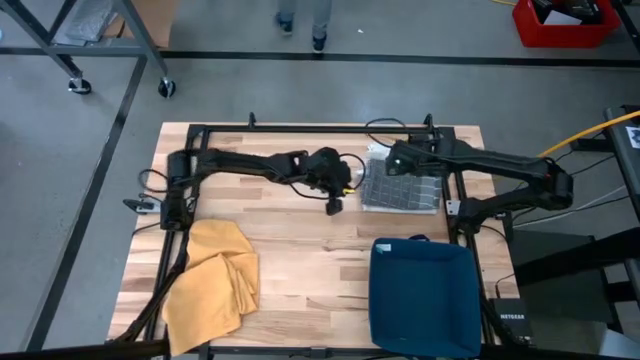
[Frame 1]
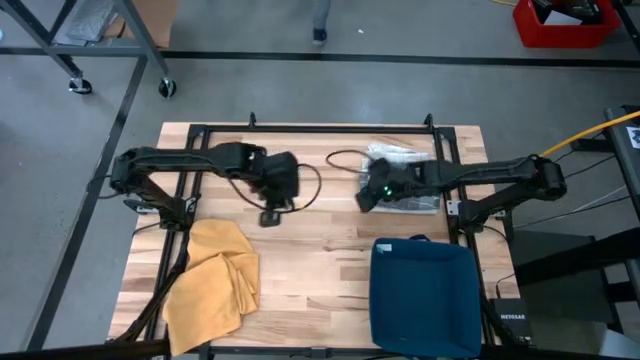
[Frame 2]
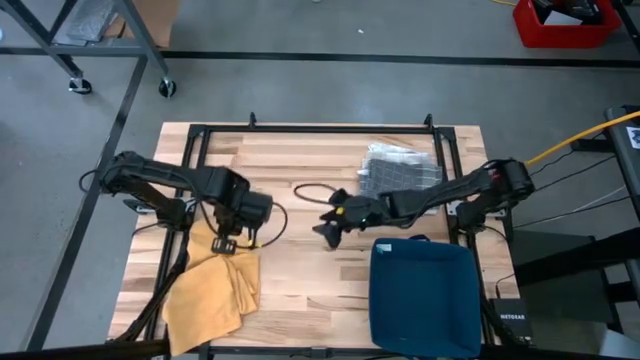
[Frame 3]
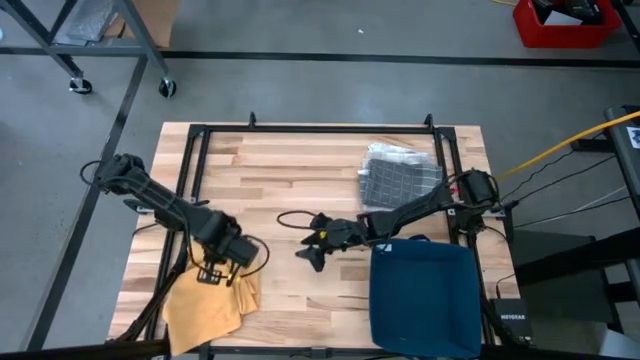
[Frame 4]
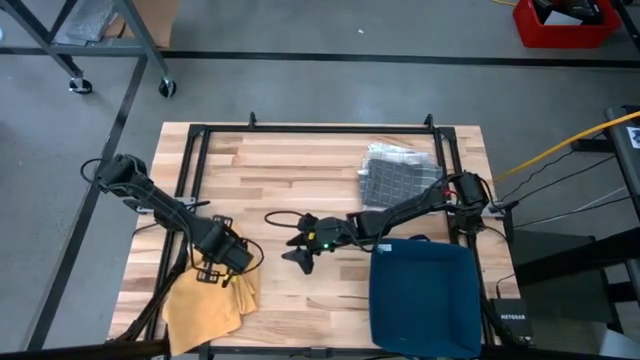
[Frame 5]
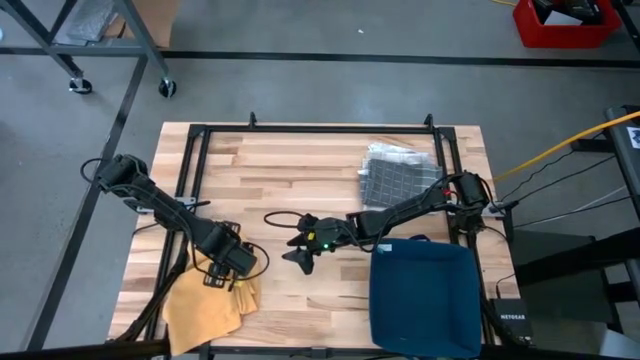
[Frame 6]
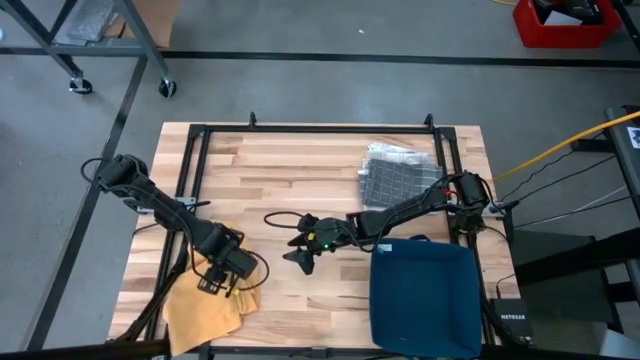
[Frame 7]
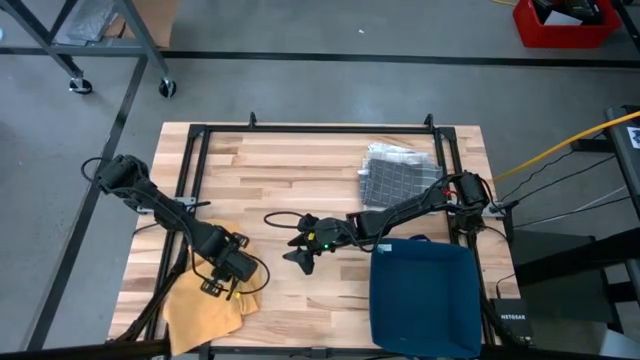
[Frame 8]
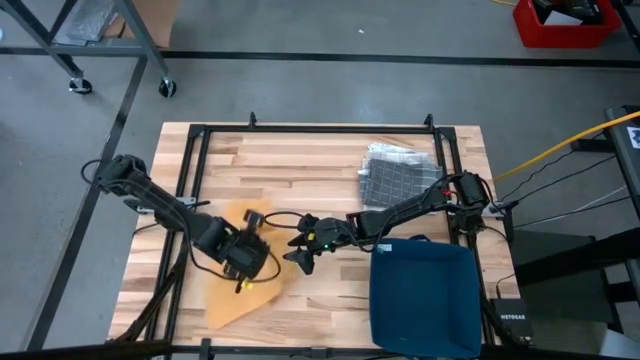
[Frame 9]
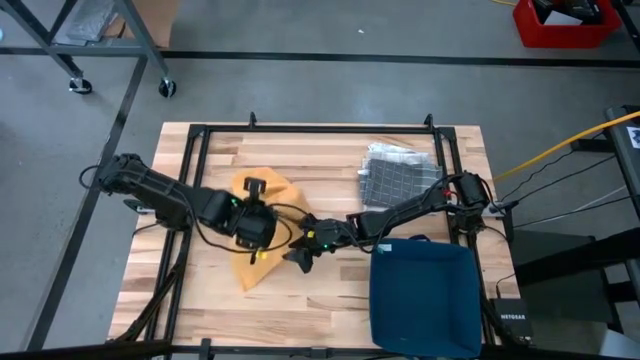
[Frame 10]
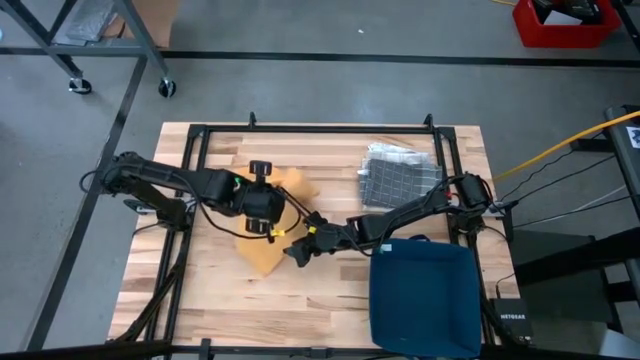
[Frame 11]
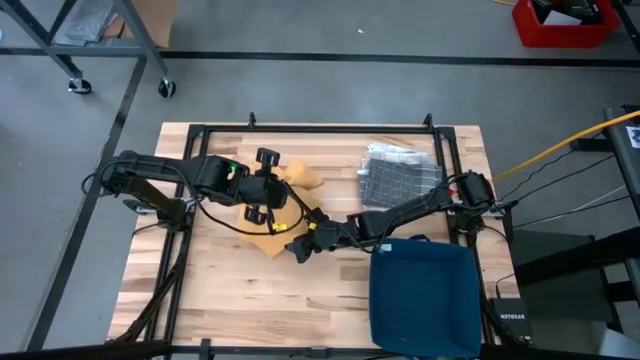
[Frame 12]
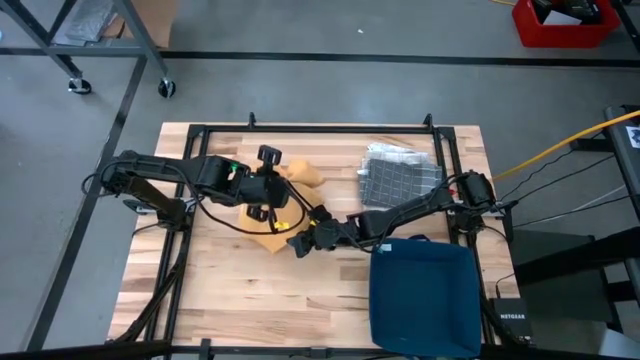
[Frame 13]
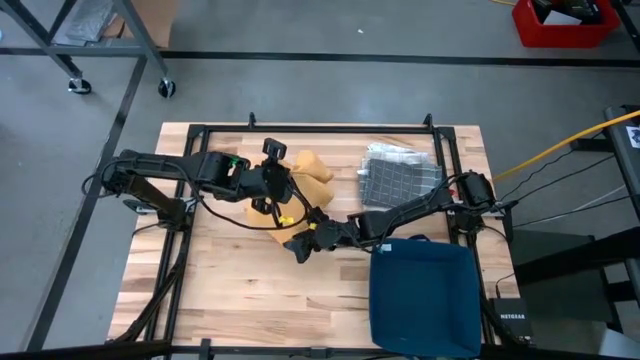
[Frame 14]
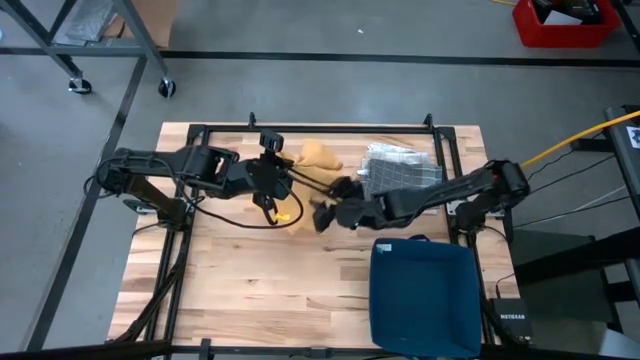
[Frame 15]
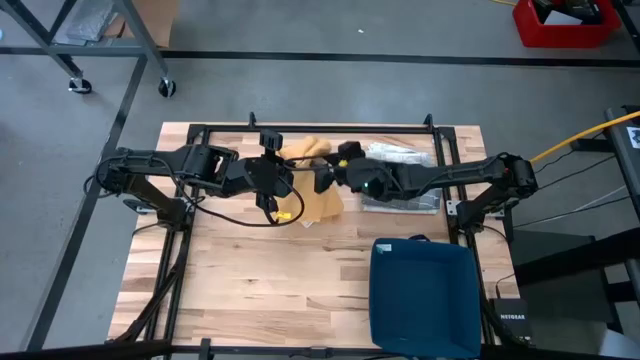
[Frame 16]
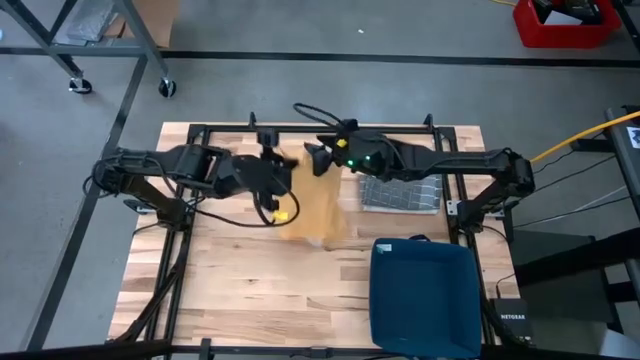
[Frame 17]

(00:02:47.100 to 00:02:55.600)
Task: Fold towel
Fold yellow towel

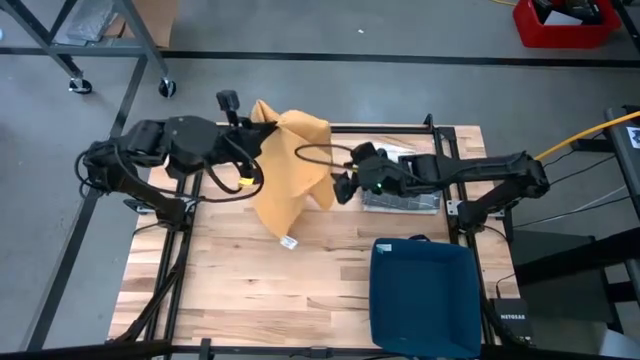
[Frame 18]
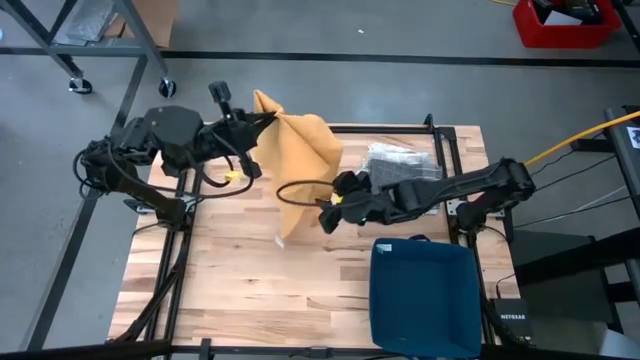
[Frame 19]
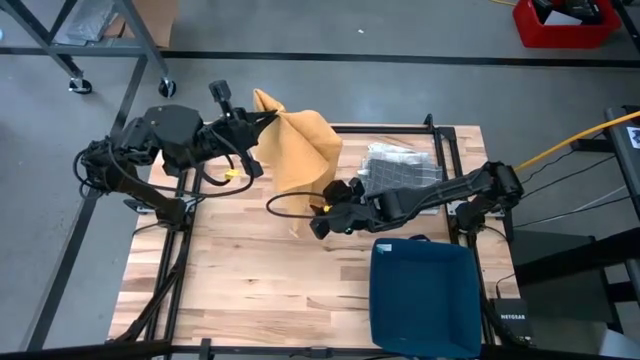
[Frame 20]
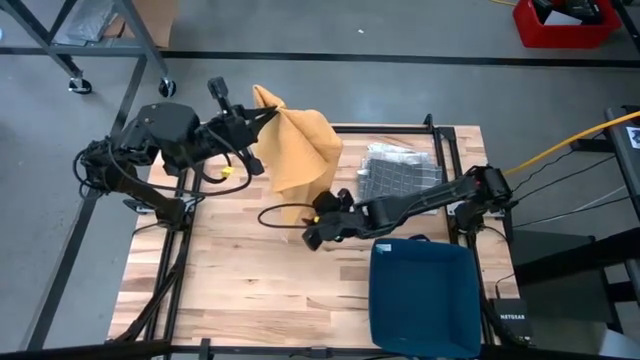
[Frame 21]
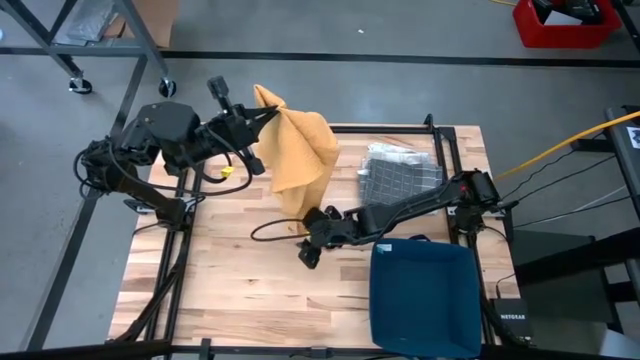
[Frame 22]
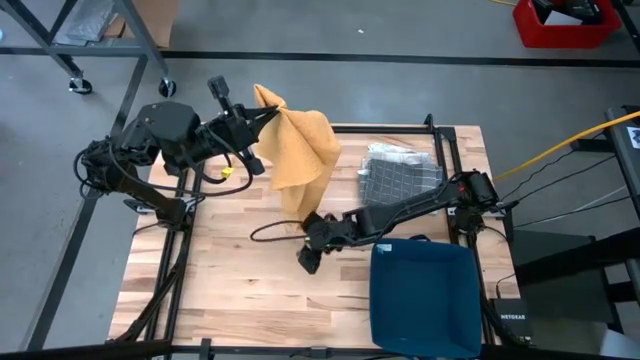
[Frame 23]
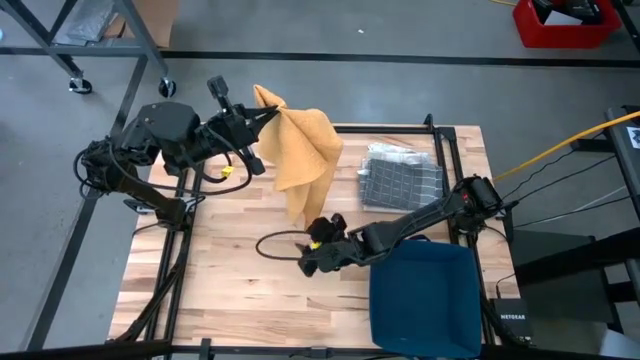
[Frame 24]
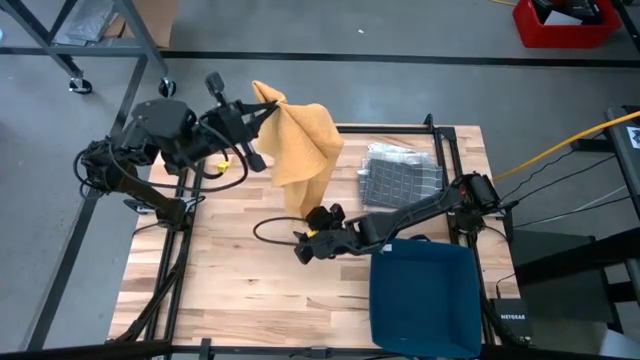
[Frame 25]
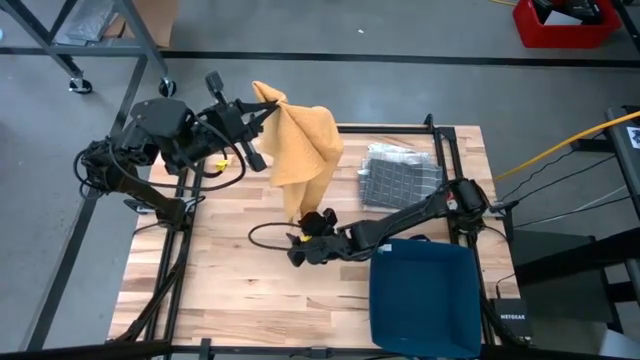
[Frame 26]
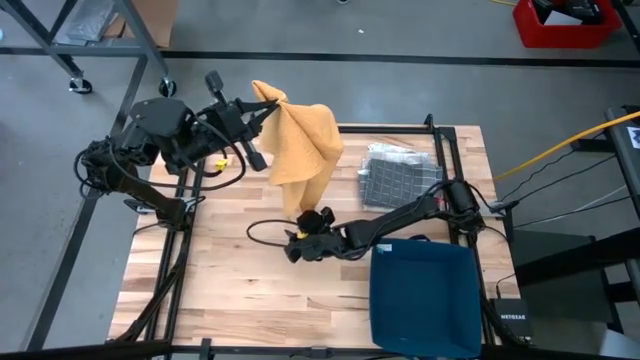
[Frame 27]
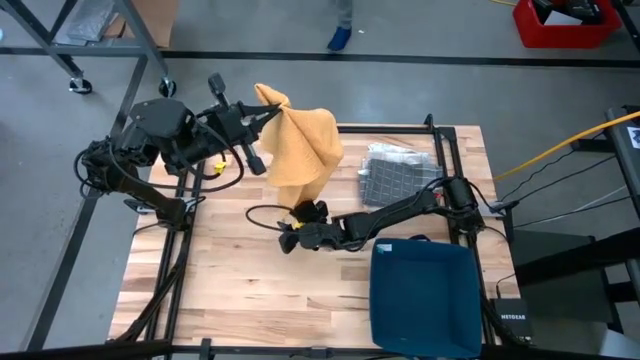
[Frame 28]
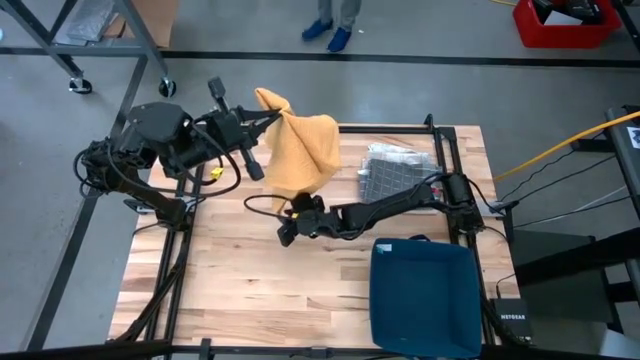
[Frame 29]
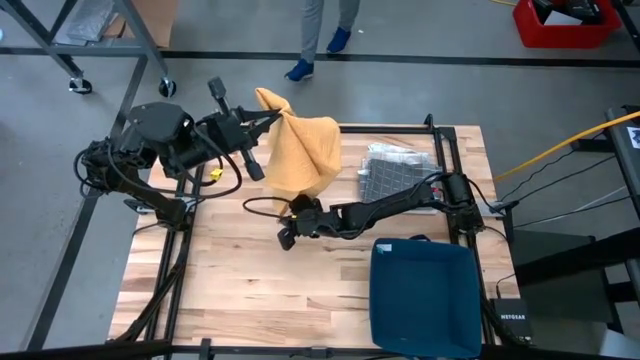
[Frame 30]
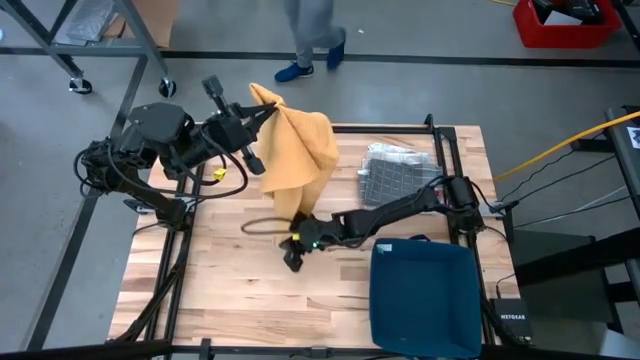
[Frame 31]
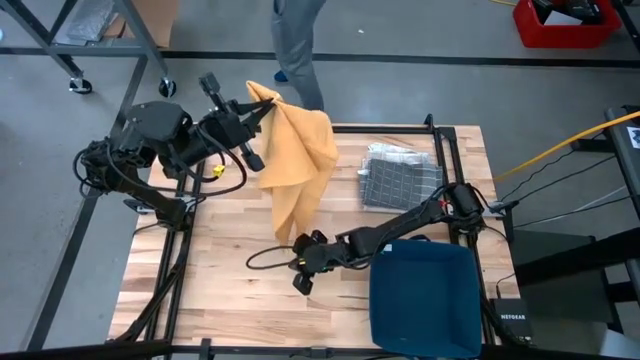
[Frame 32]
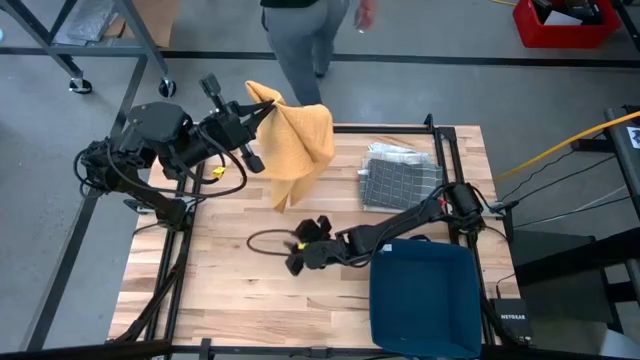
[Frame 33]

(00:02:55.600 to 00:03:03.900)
Fold yellow towel
